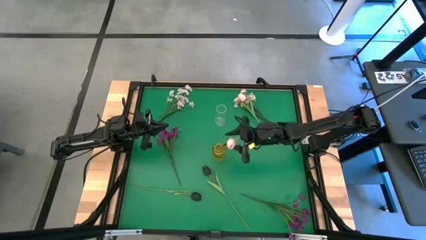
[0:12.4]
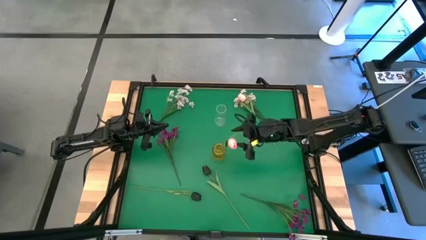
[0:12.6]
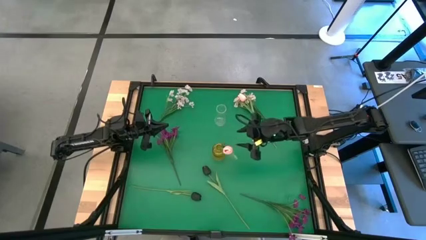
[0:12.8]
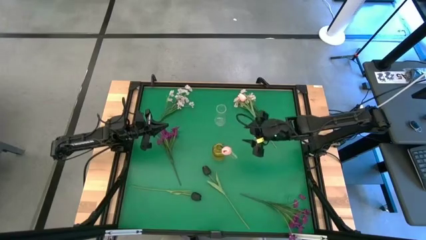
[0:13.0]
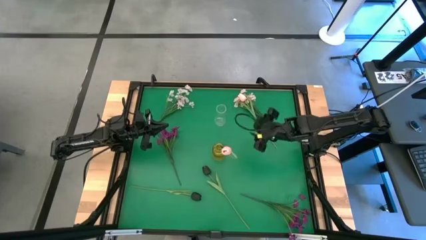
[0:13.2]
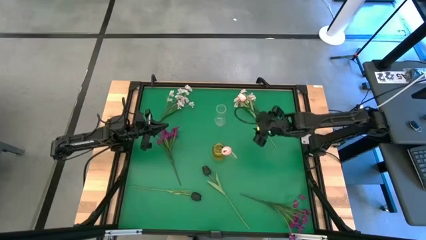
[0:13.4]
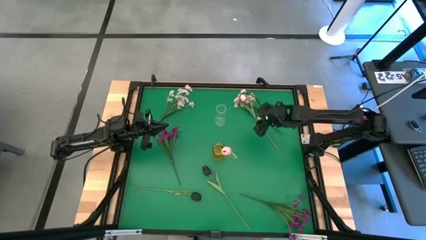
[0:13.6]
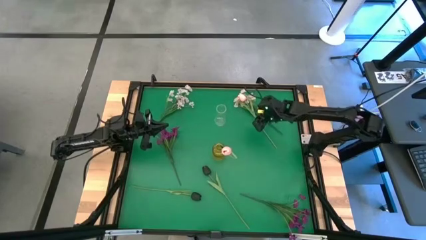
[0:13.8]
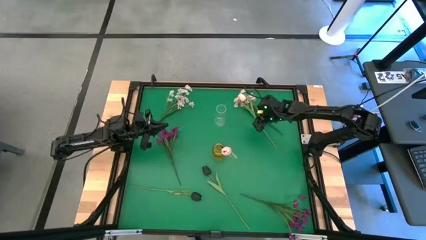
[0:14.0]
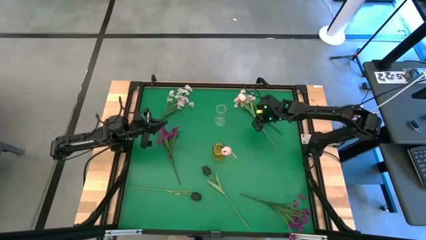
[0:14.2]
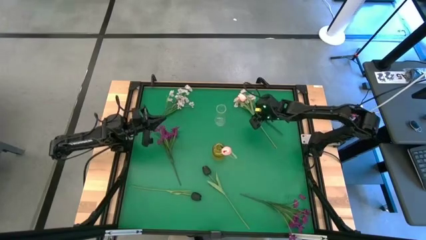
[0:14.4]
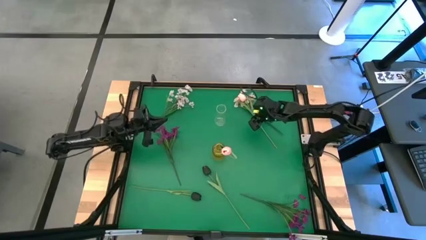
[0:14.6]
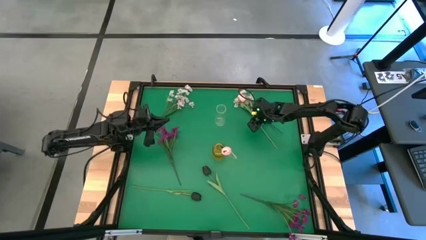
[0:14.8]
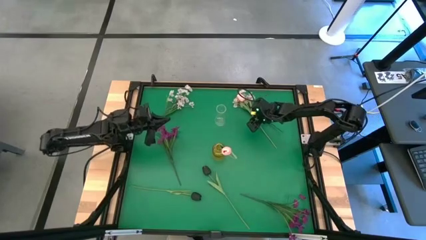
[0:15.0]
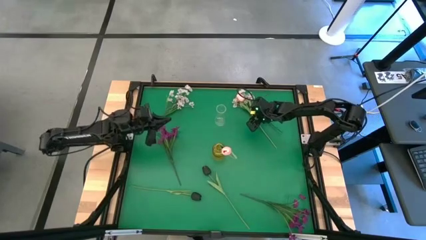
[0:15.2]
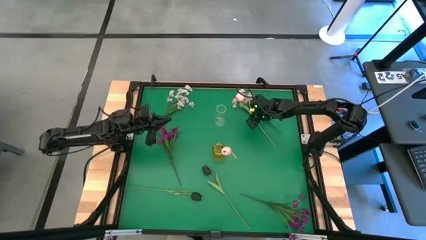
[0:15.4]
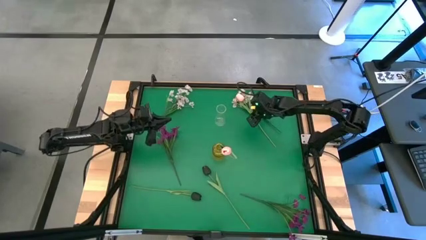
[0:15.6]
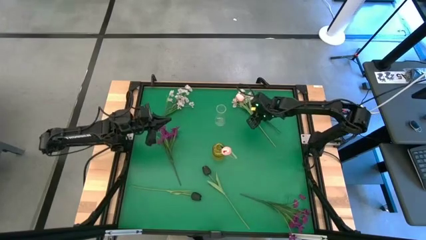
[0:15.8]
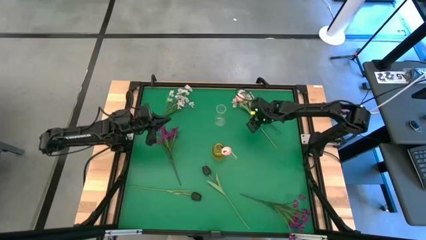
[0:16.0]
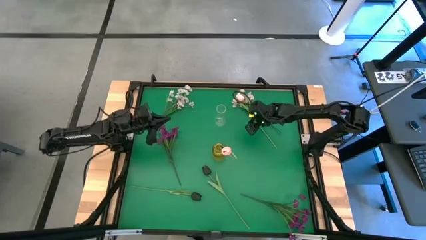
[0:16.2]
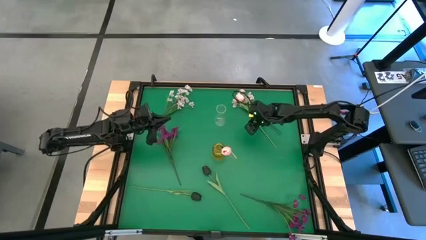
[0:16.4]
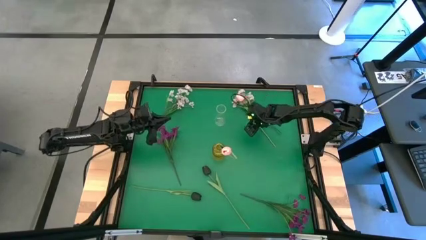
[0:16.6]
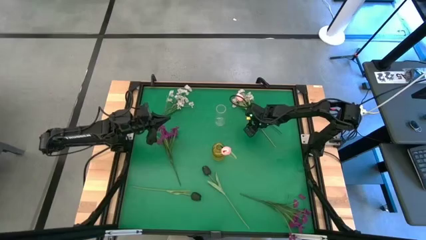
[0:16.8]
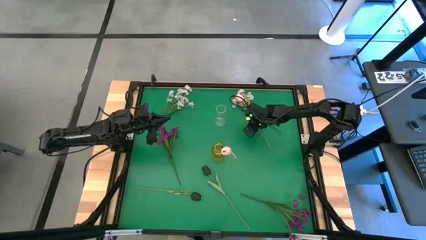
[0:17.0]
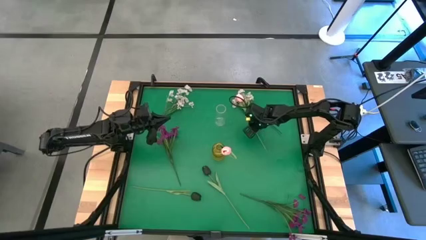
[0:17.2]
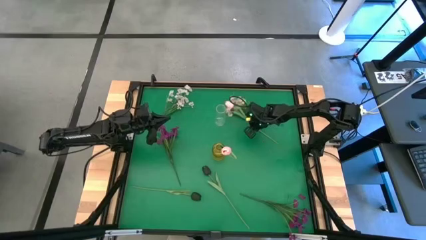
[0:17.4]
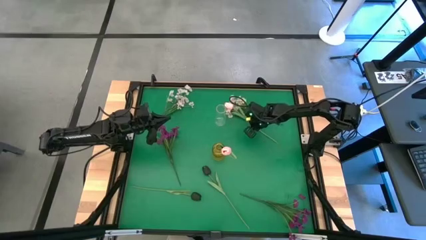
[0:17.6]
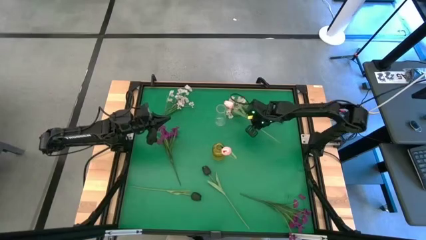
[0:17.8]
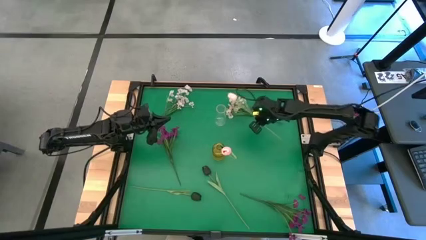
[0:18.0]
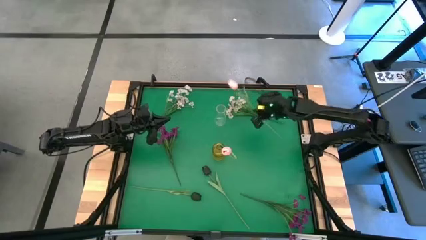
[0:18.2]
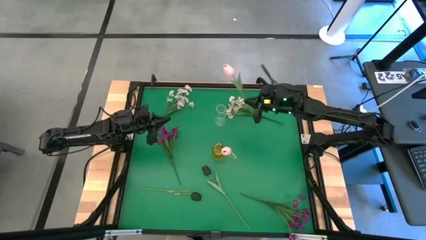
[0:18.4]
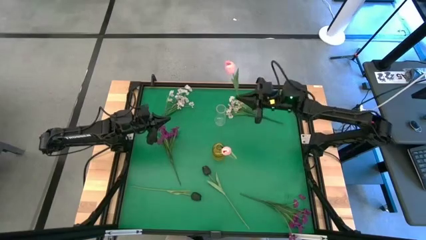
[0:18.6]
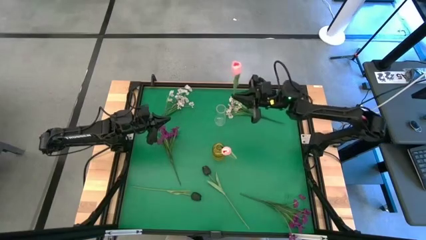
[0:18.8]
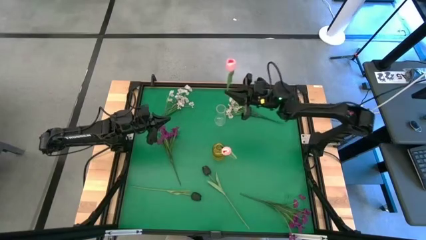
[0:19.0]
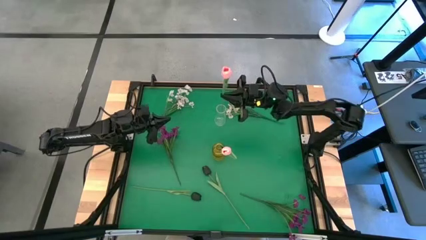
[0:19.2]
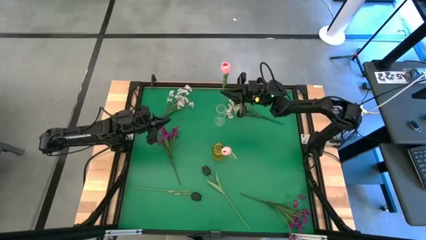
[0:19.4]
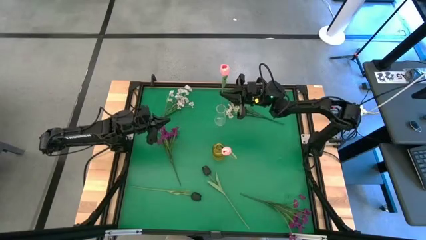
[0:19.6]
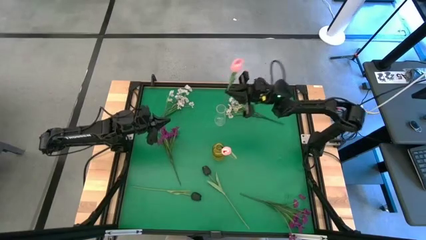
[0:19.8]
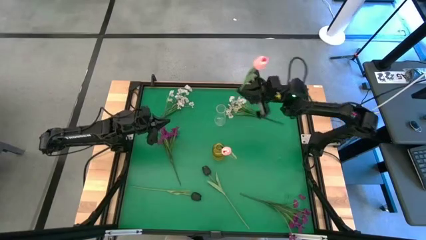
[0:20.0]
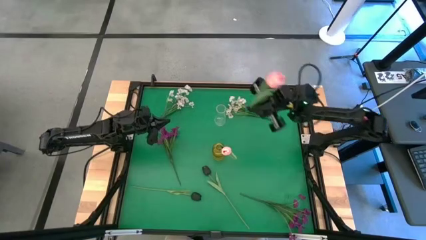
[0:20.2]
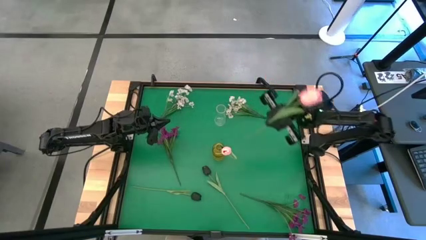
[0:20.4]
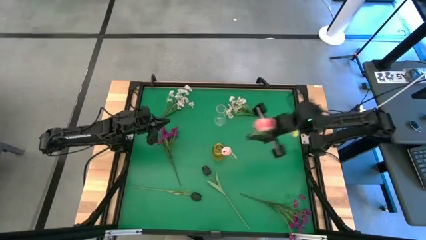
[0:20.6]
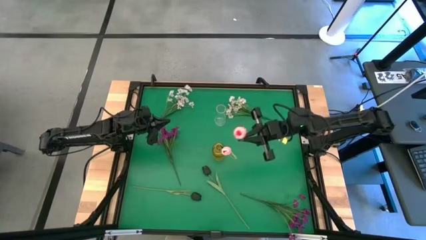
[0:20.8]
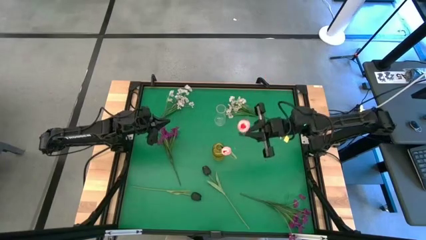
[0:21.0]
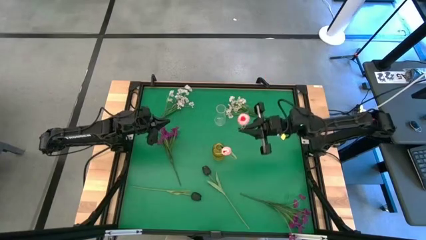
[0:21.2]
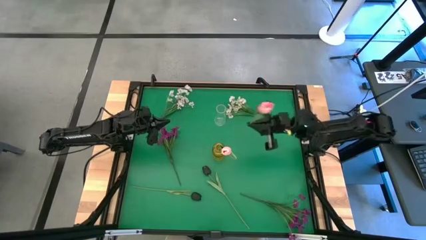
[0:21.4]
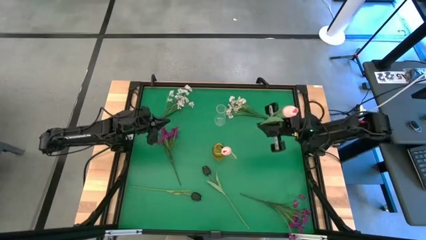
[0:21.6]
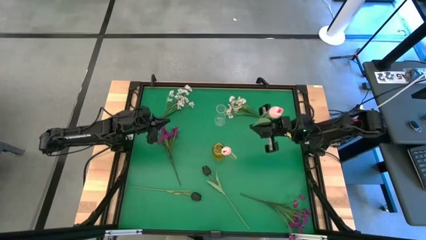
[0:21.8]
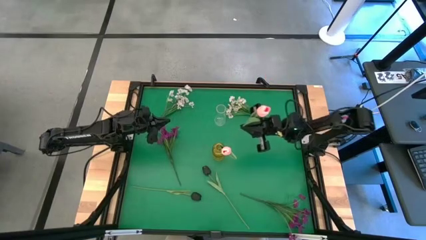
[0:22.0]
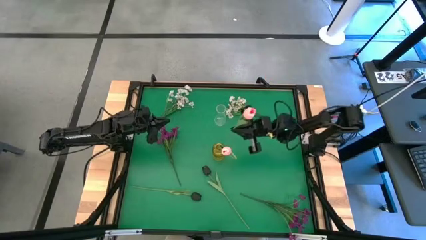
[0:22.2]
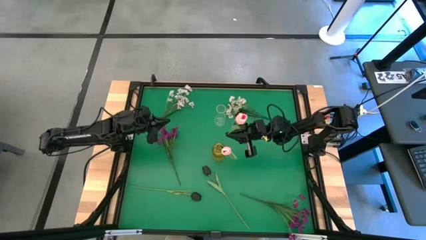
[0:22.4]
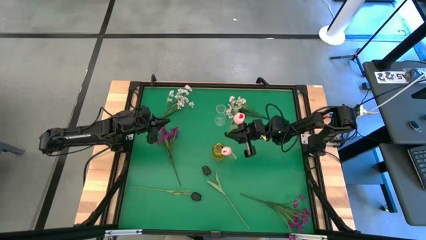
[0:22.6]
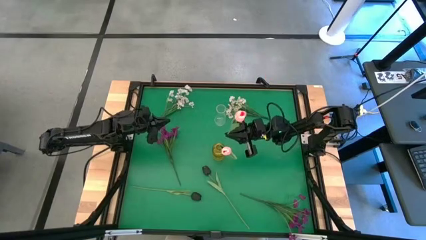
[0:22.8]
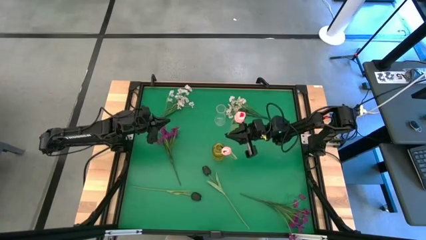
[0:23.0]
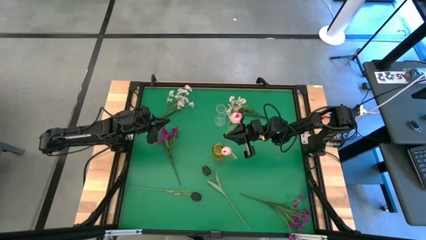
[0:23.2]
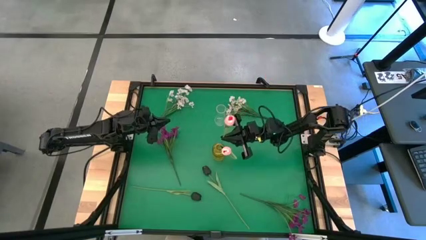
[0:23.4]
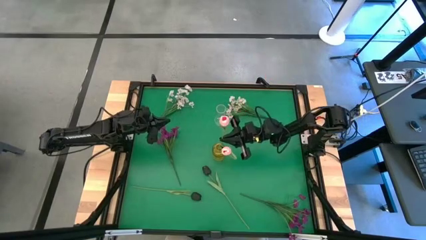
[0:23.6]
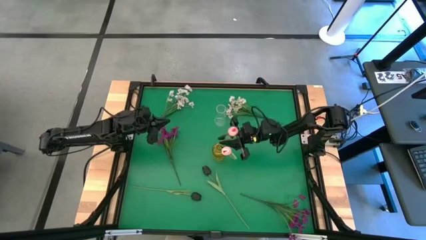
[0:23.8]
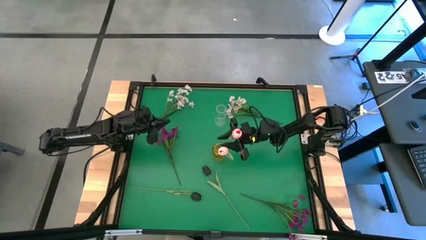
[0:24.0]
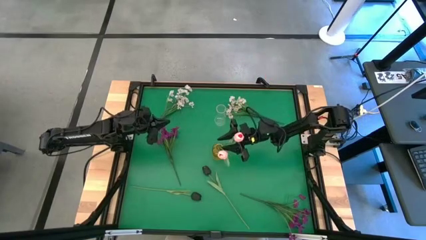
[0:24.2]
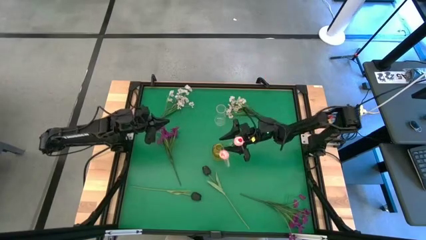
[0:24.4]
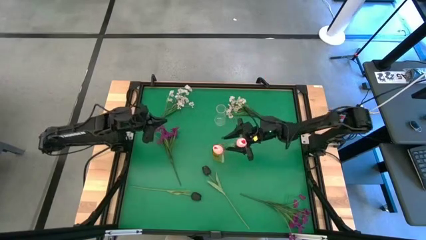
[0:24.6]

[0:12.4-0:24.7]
Task: Sort flowers into vase by color
Put the pink tulip into the yellow vase

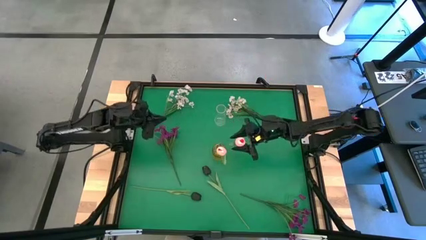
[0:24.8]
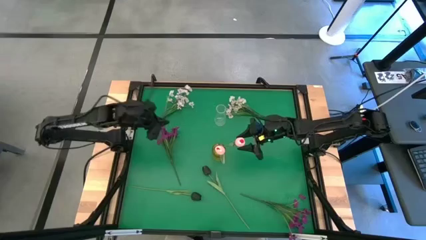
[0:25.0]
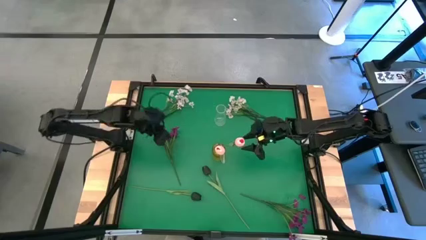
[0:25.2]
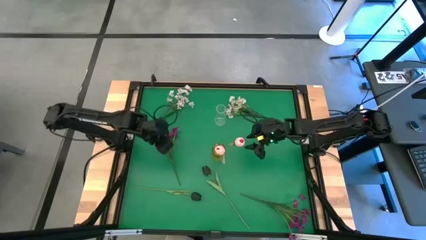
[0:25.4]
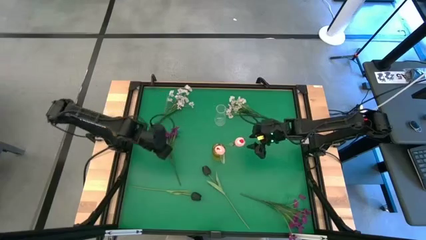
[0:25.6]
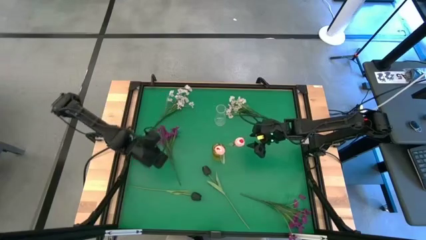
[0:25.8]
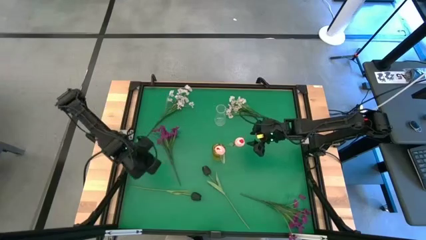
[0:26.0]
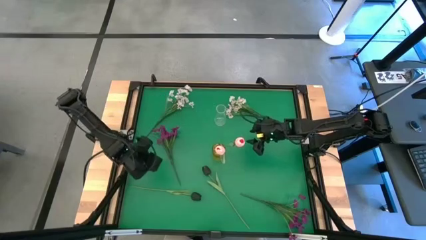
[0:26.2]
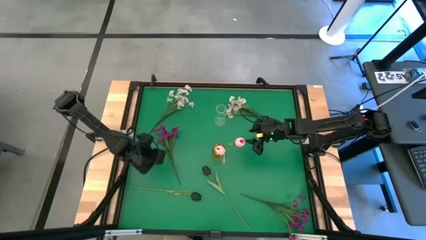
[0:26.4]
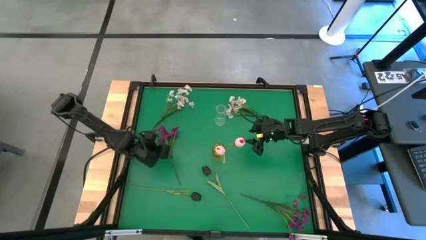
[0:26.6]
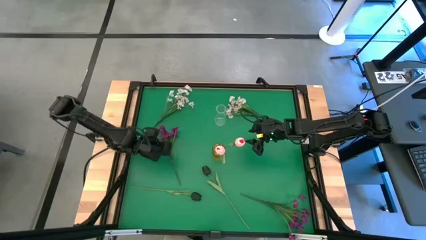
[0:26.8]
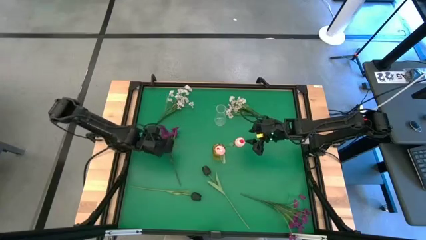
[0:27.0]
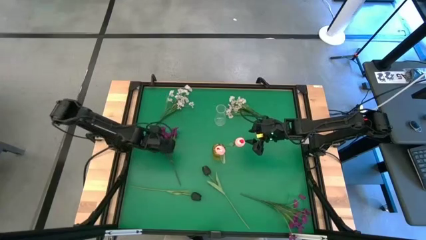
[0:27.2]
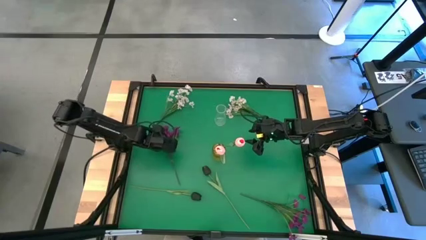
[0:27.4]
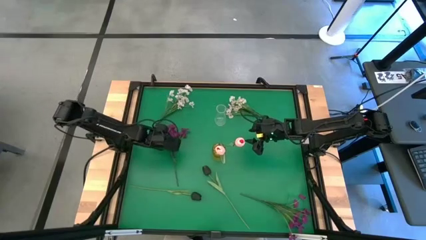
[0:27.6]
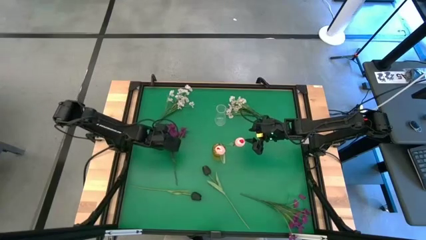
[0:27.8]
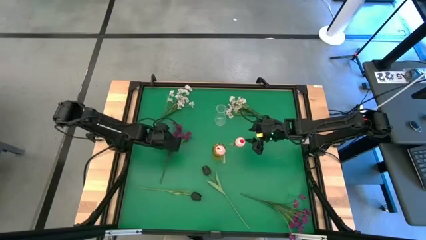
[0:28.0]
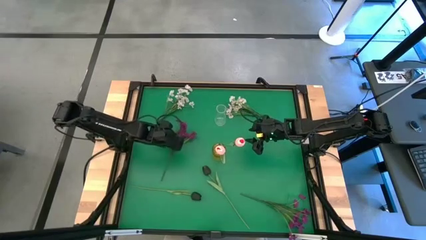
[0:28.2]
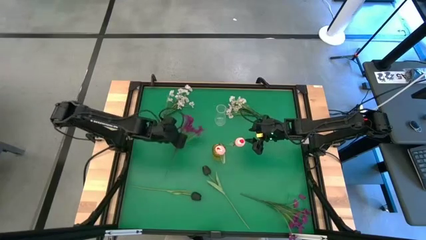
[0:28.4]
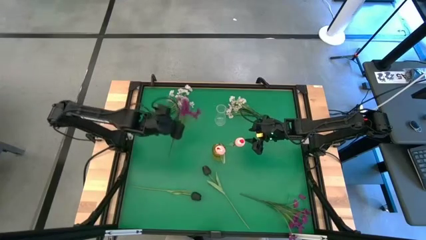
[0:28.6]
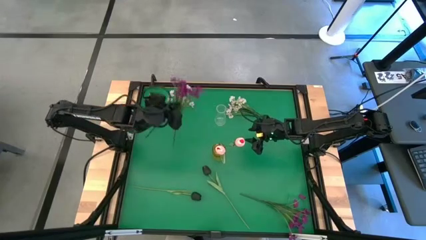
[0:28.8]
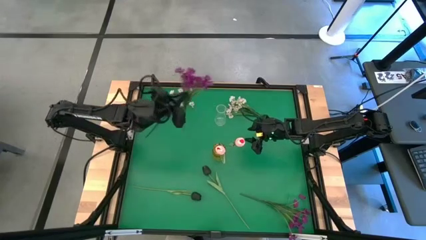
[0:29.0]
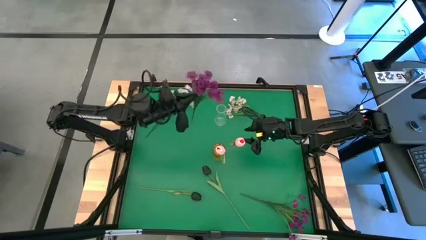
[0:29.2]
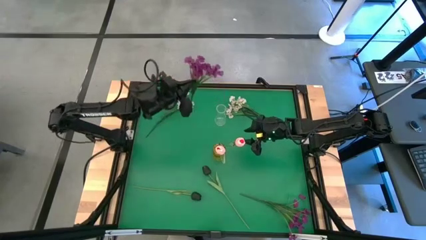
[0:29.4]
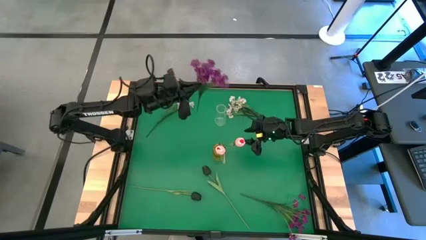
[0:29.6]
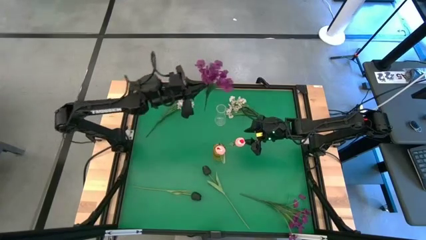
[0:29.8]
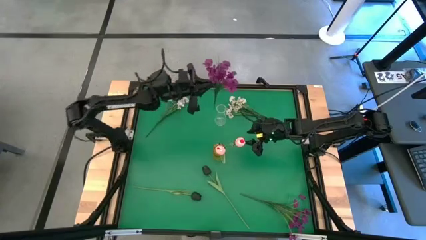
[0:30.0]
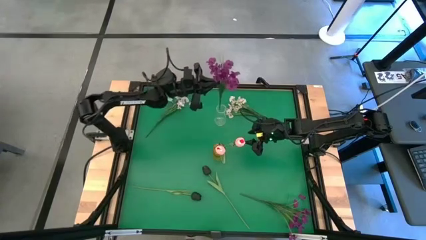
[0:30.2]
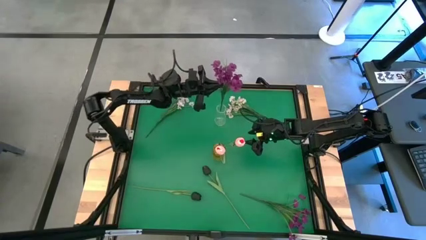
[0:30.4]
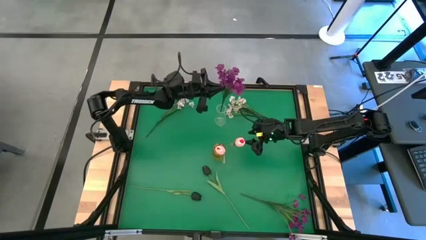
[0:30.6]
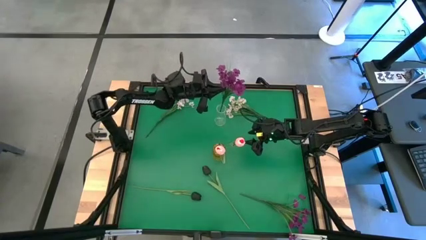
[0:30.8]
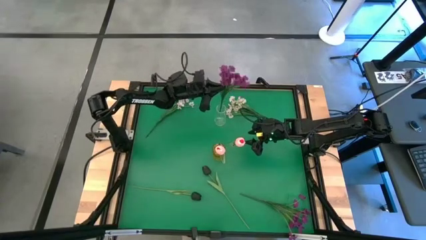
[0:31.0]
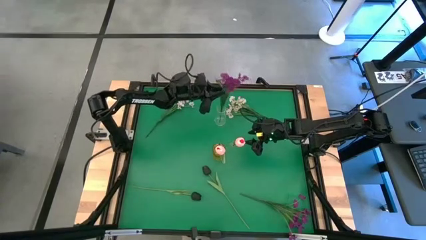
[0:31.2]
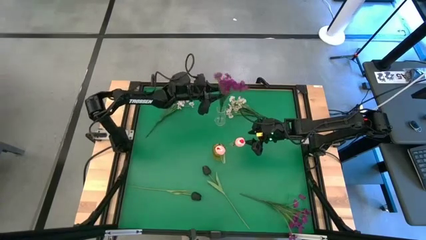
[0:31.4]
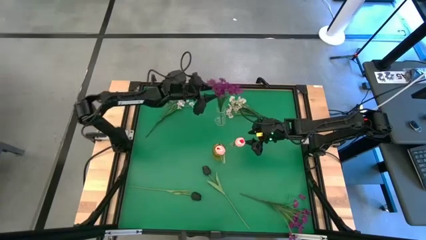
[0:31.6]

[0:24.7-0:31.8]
Put the left violet flowers into the transparent vase
